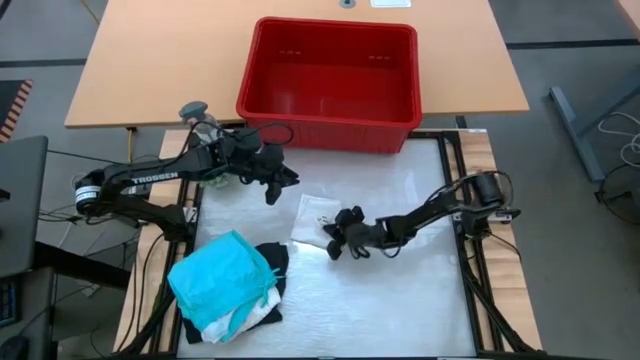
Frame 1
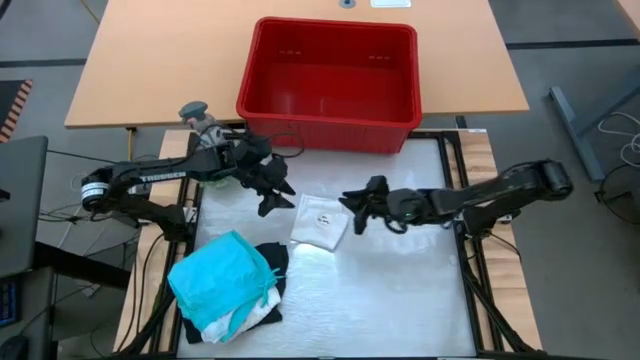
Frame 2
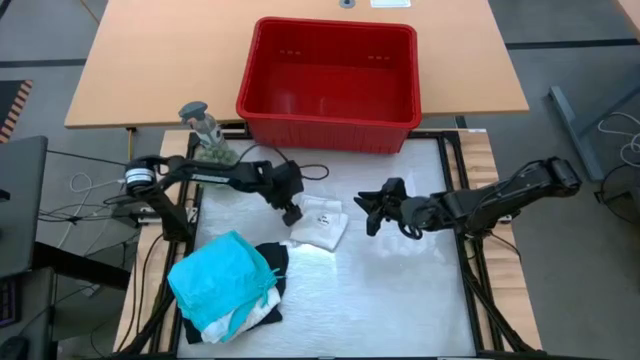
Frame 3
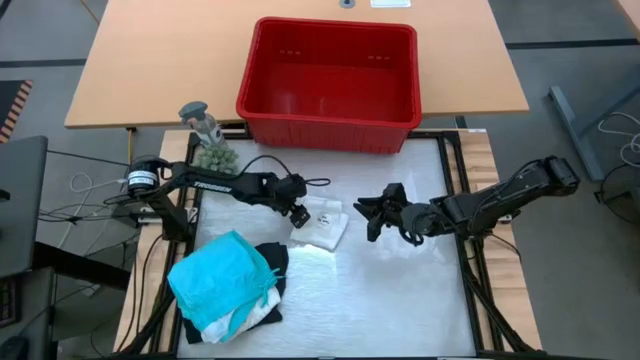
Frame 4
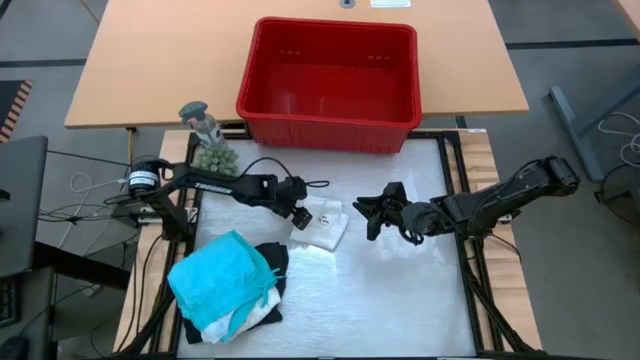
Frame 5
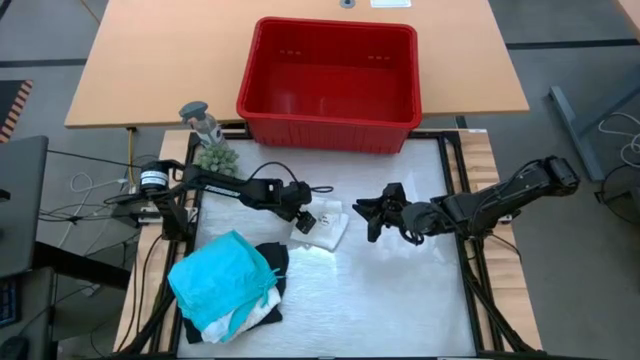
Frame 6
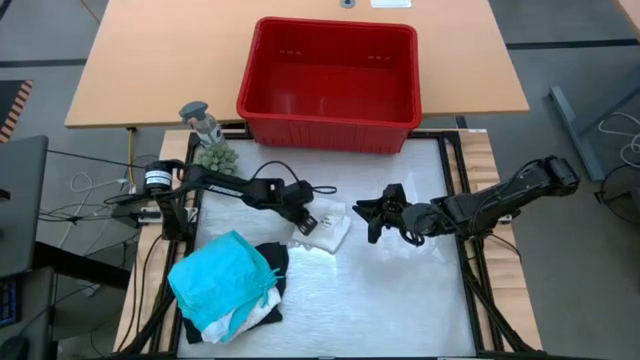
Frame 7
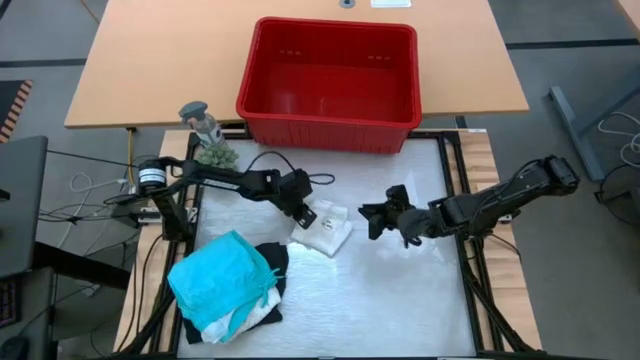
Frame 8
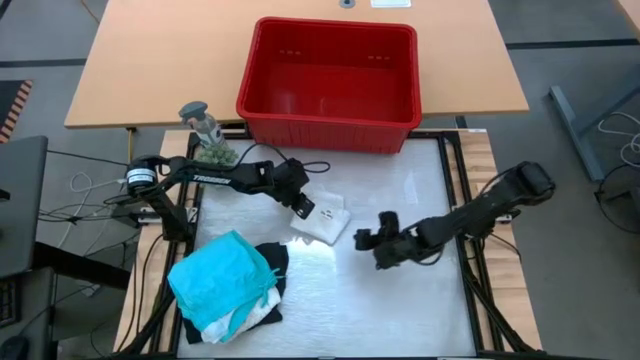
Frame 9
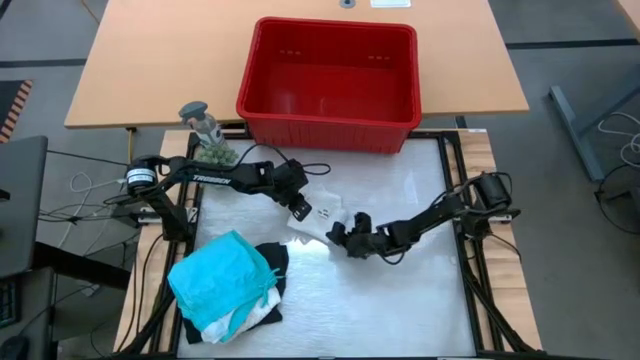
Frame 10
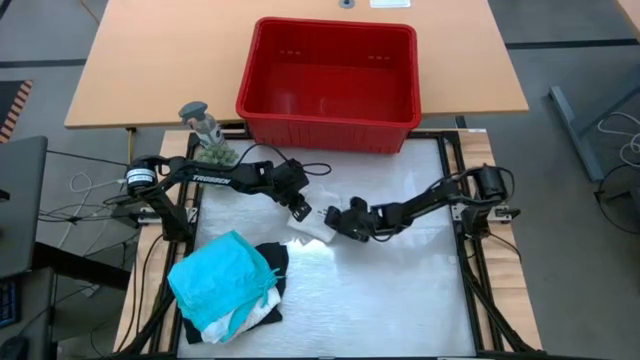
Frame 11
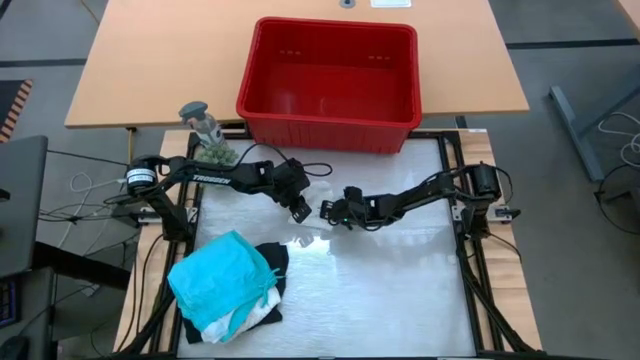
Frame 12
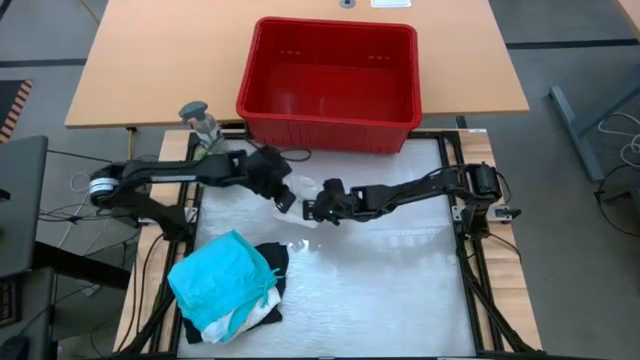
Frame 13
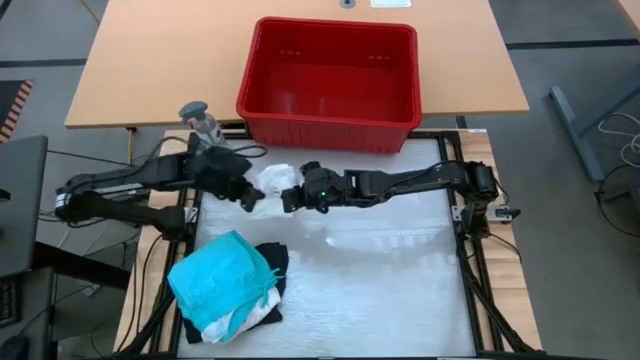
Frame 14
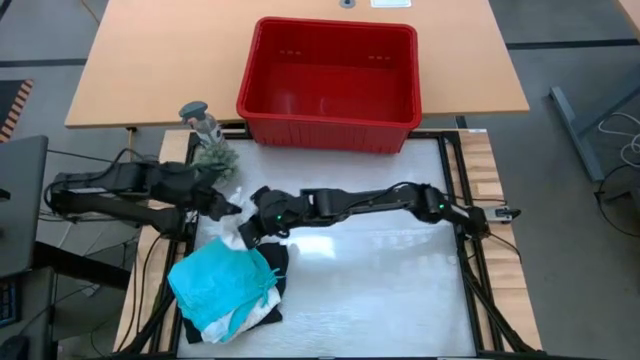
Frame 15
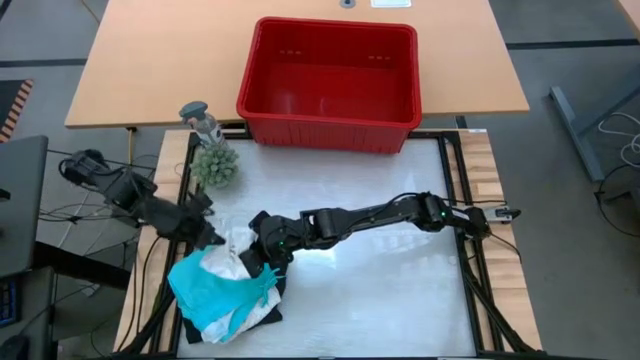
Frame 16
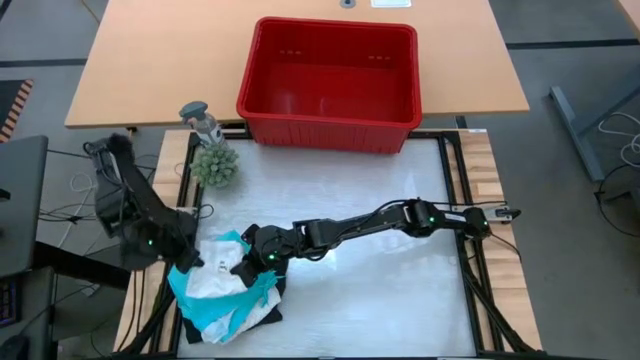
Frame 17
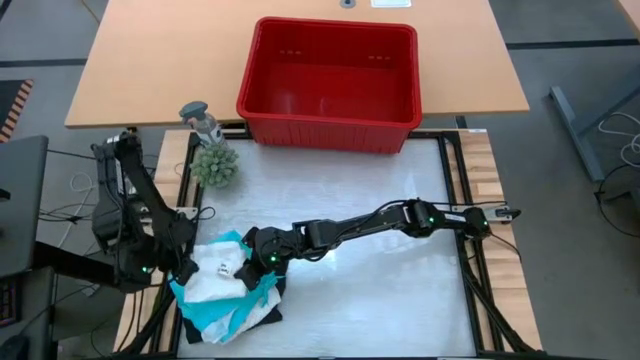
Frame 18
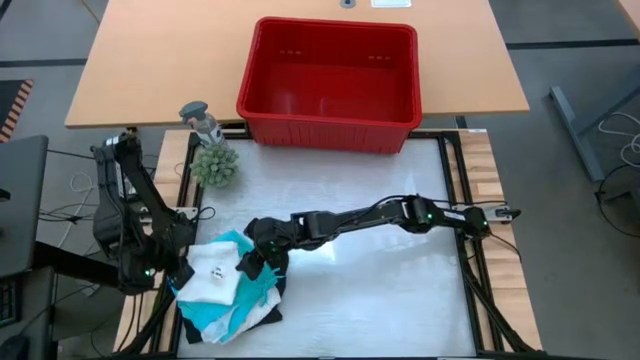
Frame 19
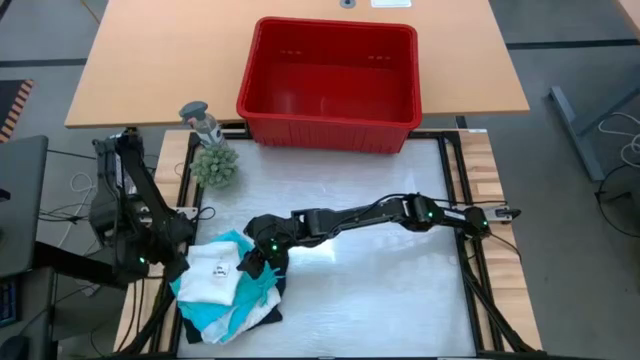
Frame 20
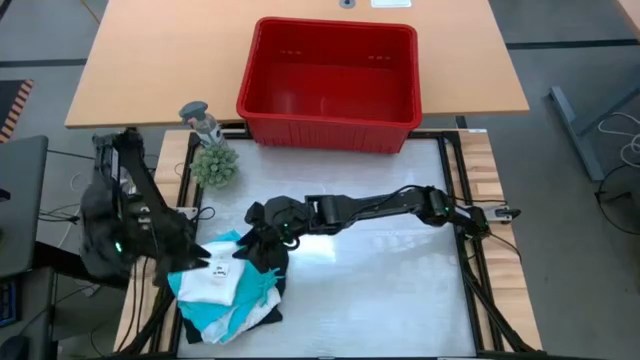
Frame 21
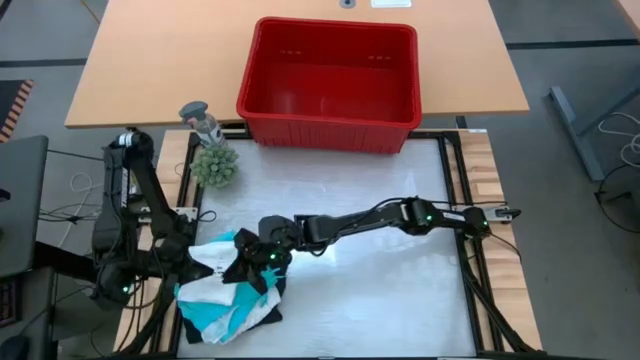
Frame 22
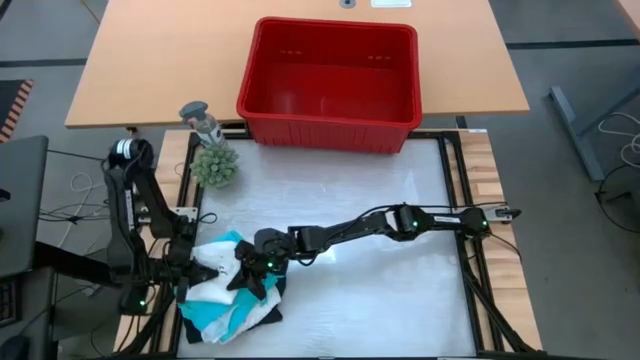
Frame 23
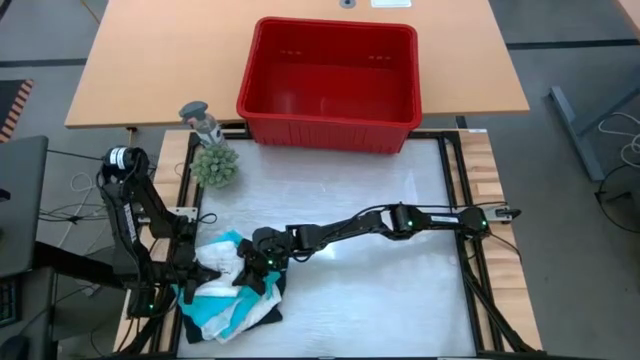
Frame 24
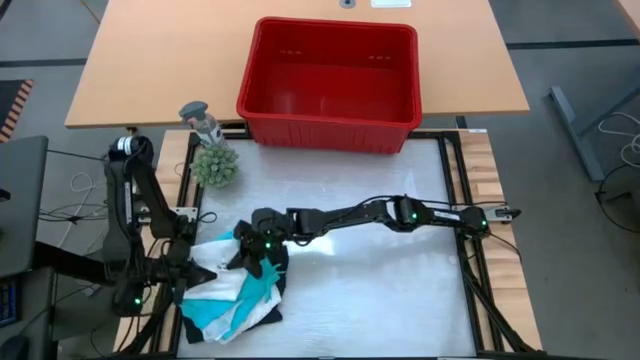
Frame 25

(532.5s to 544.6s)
Task: Fold Laundry from Bin
Stack the white shorts on top of the blue shorts

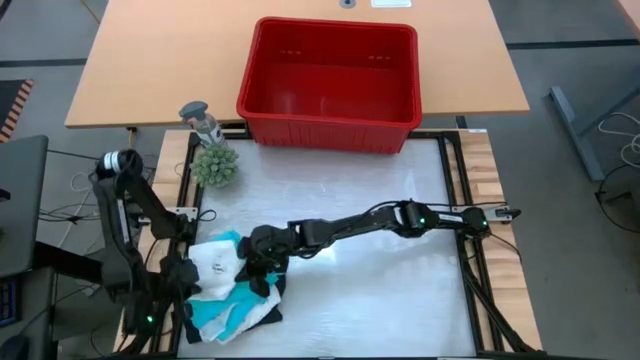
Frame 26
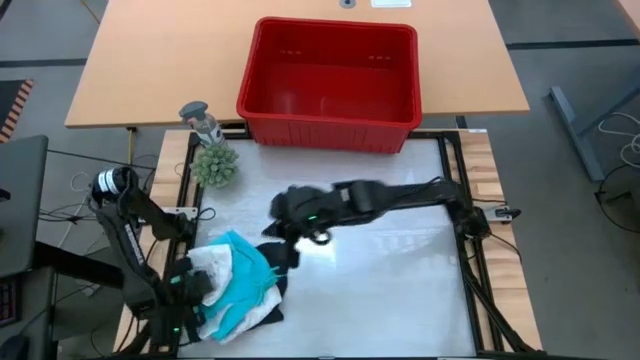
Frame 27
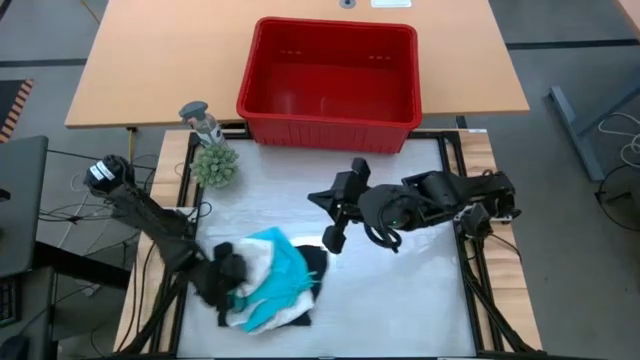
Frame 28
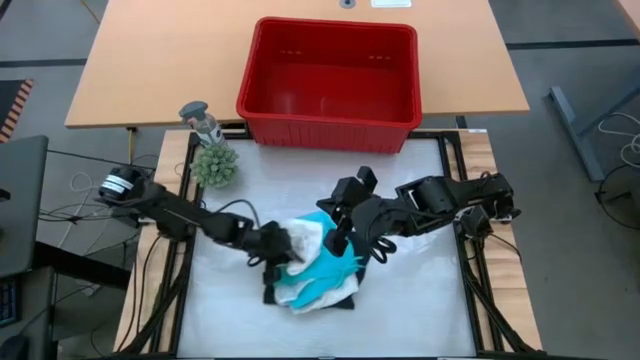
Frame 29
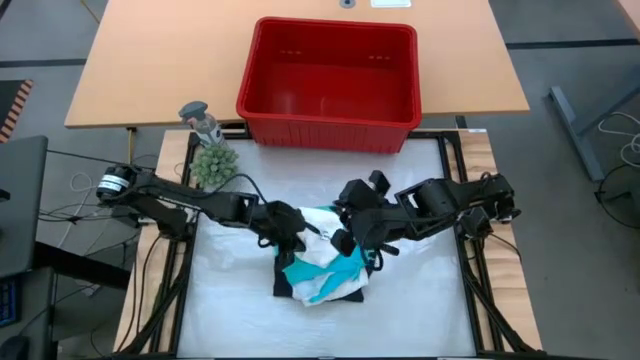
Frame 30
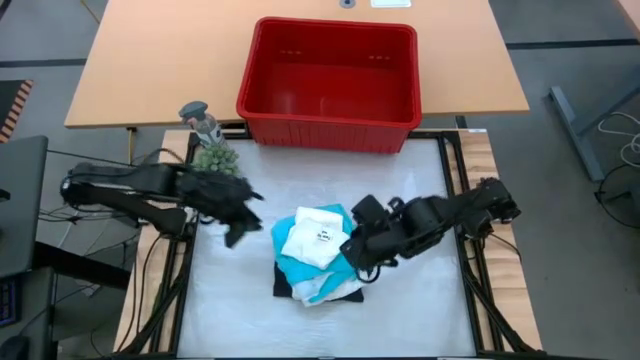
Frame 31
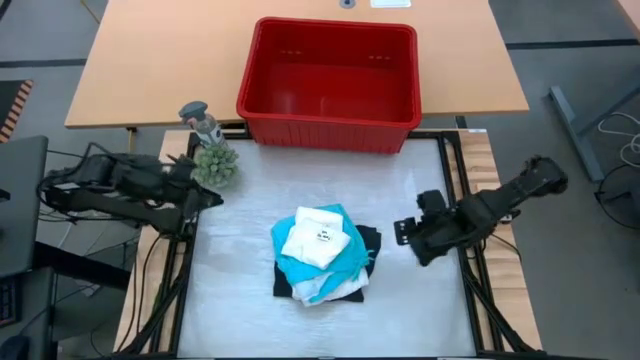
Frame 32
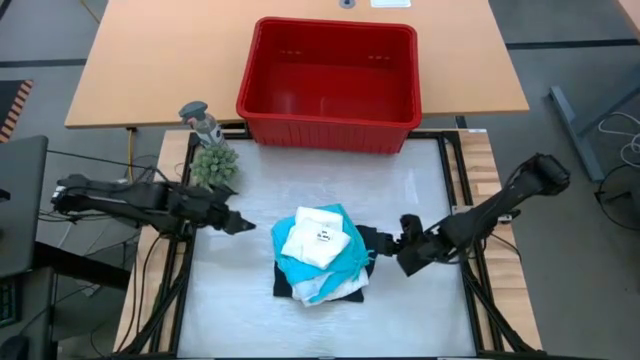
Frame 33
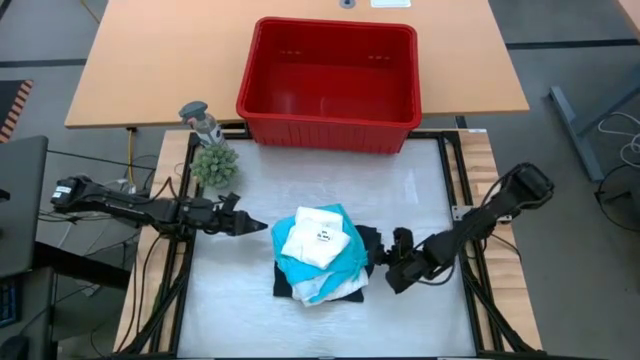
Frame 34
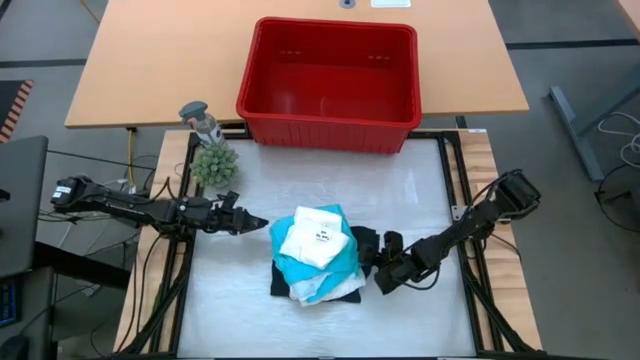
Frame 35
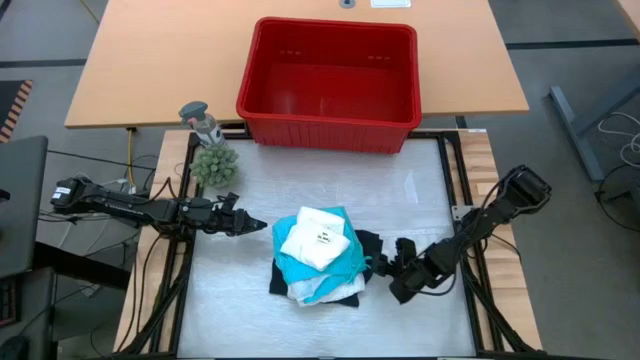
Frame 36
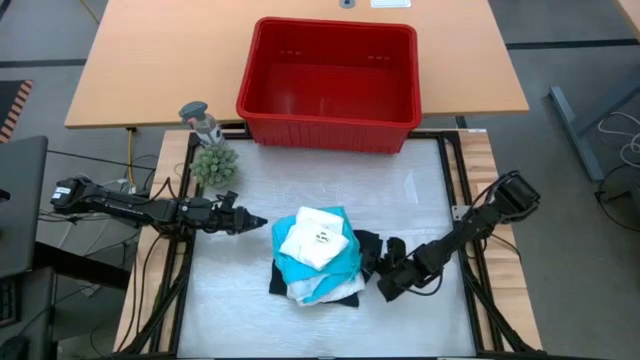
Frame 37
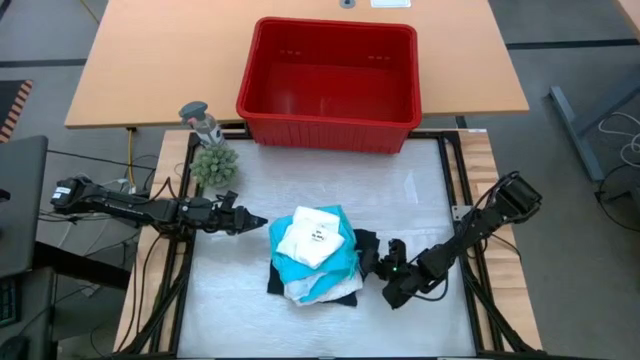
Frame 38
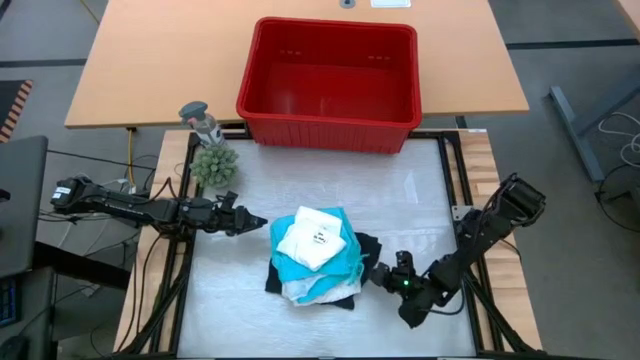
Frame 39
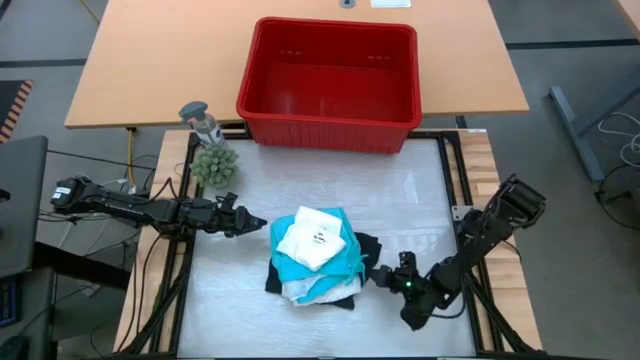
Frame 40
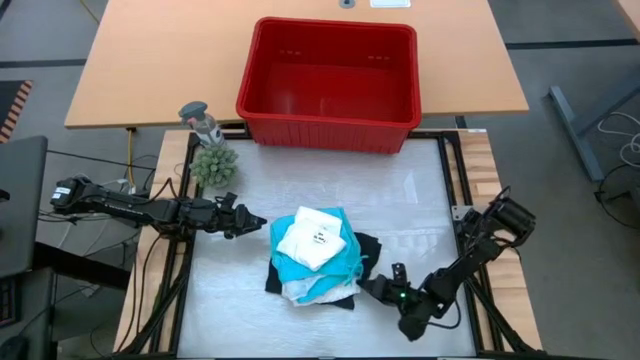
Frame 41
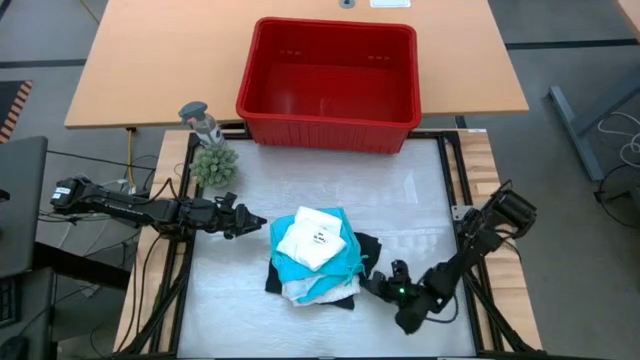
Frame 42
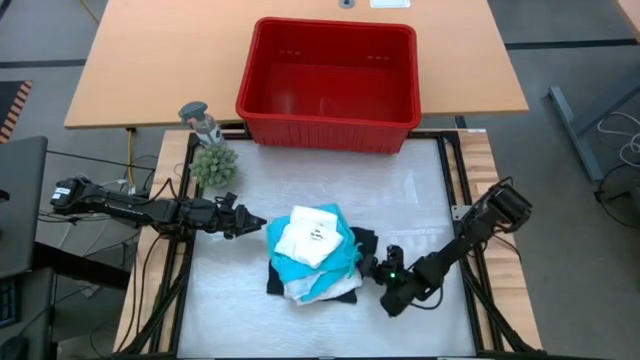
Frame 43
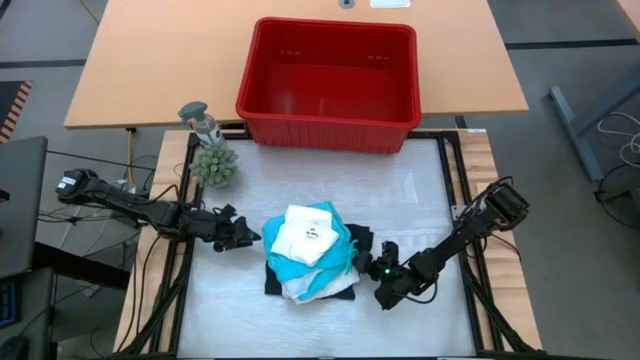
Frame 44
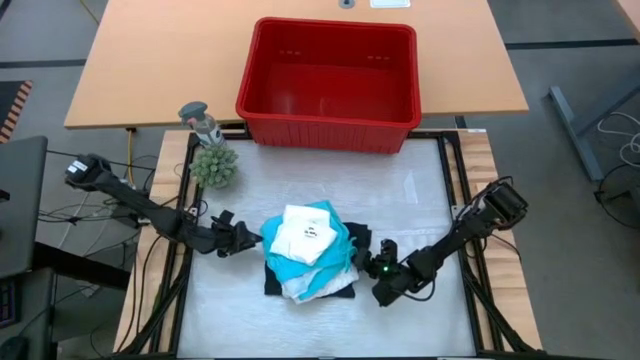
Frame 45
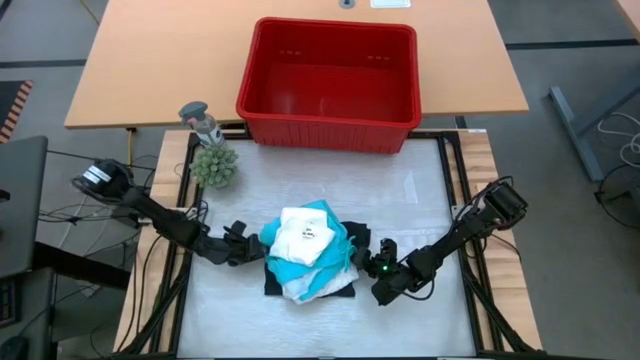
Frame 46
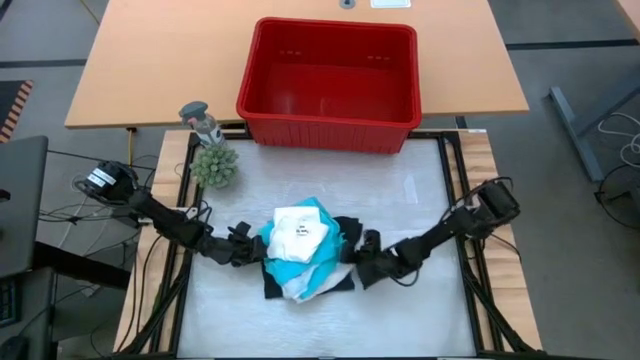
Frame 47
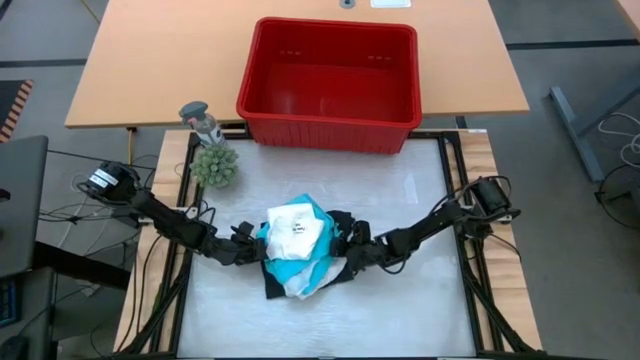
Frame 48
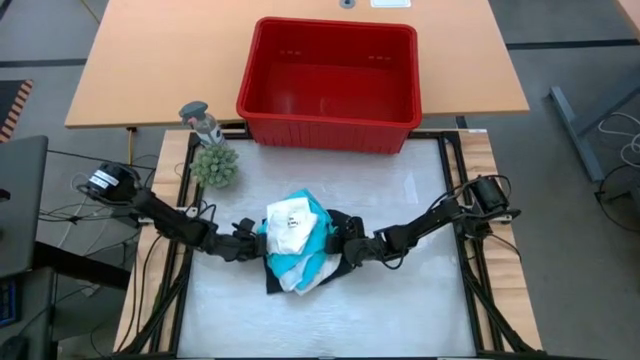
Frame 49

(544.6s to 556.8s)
Put the stacked clothes into the red bin
